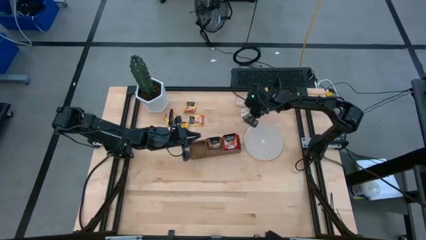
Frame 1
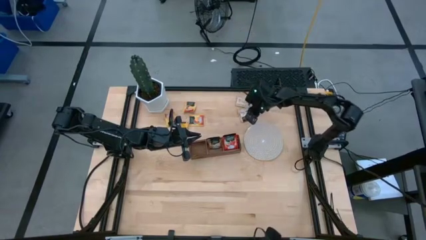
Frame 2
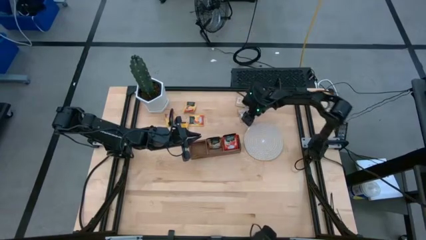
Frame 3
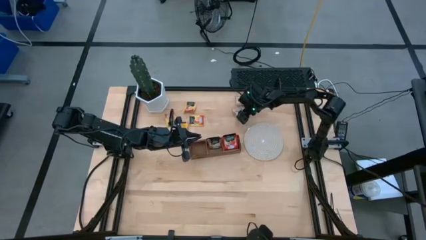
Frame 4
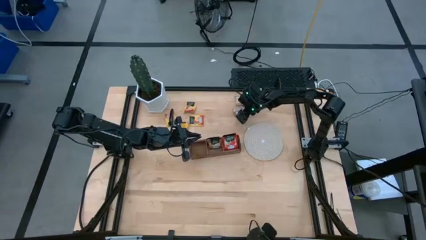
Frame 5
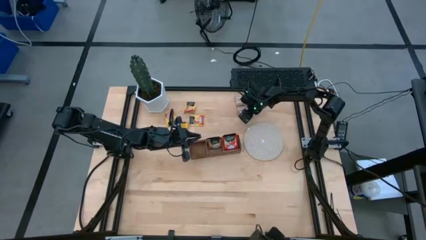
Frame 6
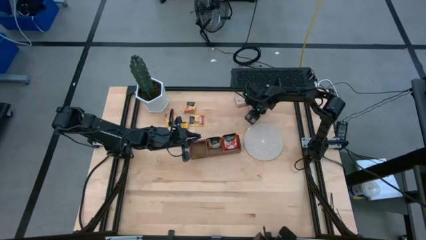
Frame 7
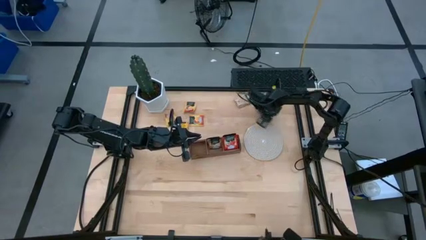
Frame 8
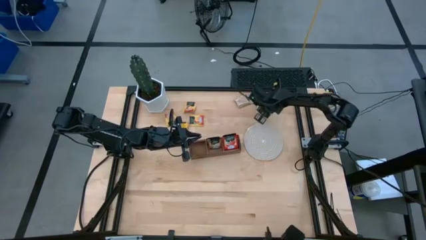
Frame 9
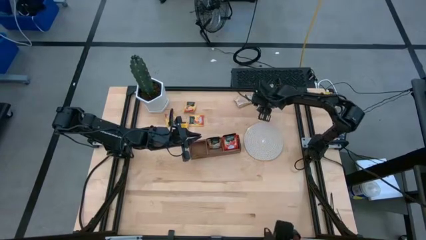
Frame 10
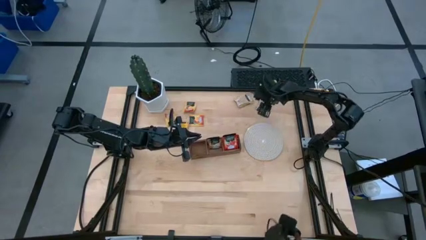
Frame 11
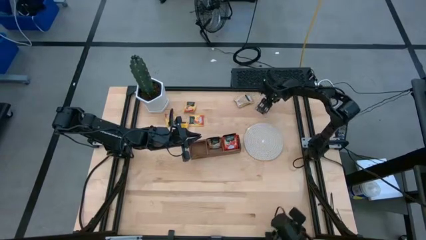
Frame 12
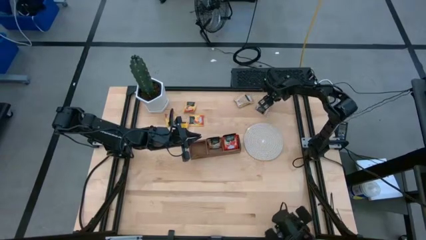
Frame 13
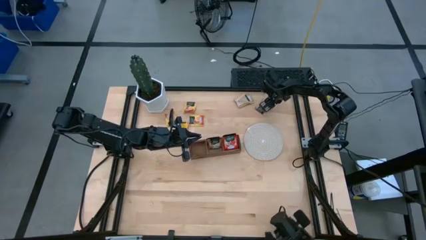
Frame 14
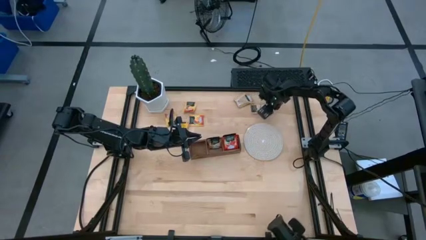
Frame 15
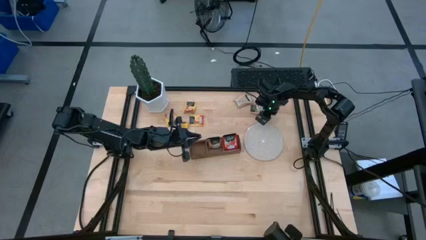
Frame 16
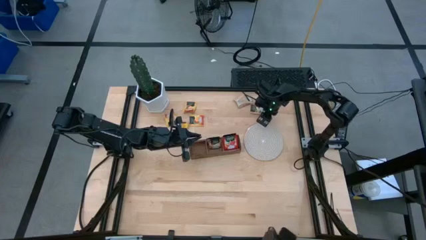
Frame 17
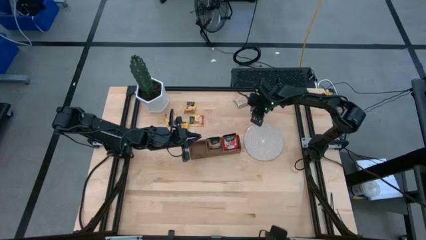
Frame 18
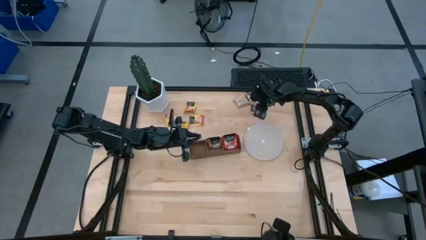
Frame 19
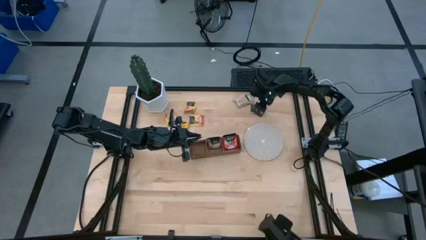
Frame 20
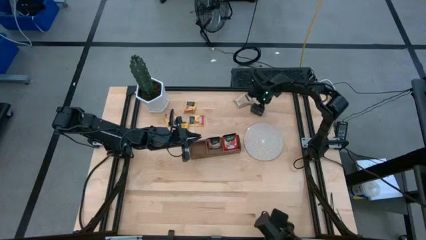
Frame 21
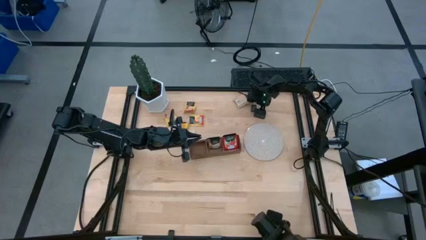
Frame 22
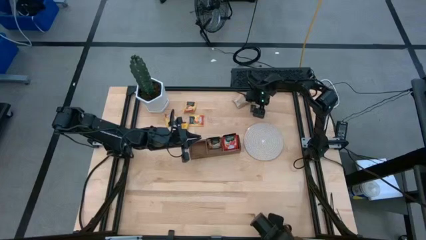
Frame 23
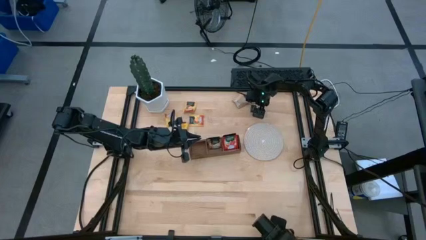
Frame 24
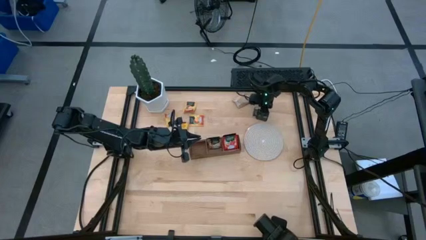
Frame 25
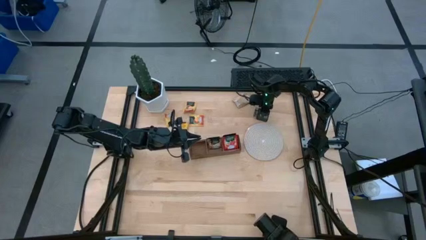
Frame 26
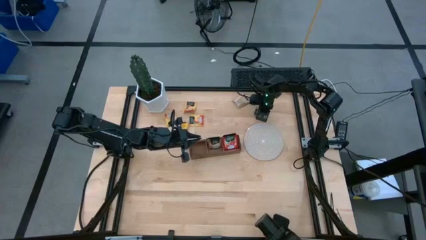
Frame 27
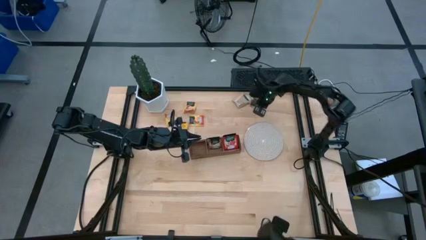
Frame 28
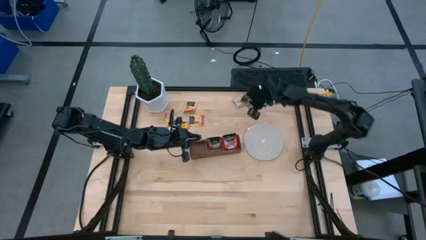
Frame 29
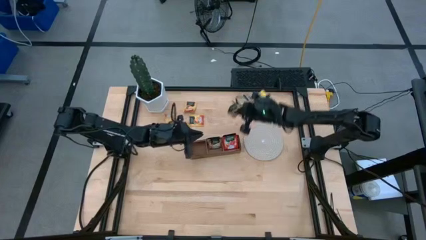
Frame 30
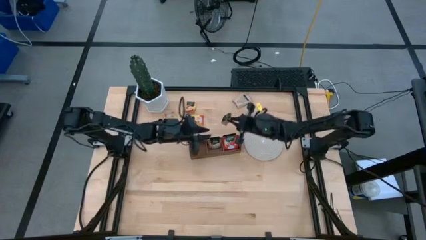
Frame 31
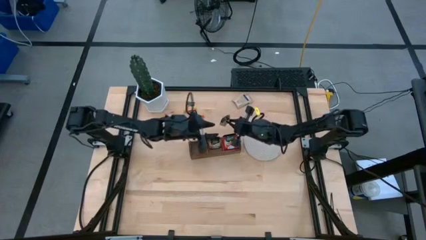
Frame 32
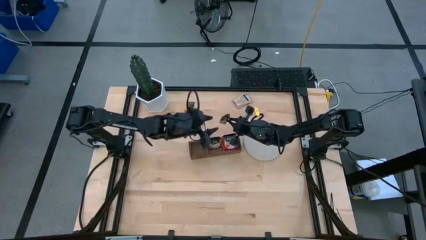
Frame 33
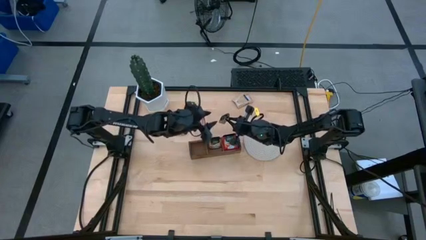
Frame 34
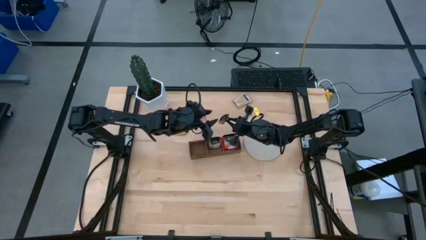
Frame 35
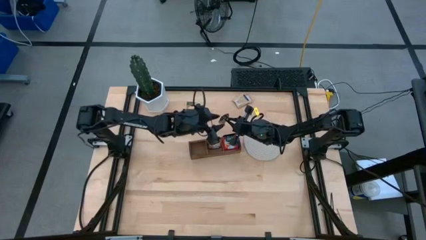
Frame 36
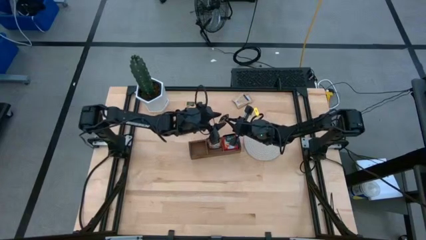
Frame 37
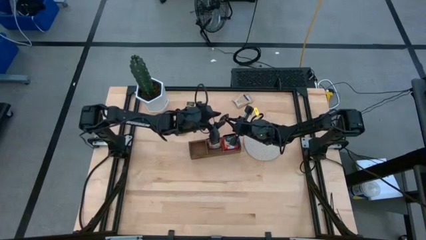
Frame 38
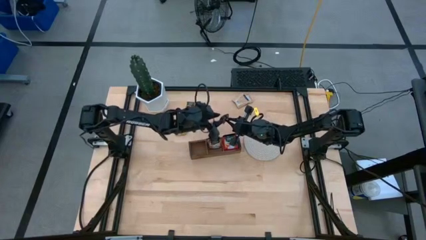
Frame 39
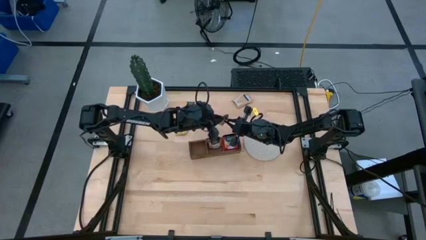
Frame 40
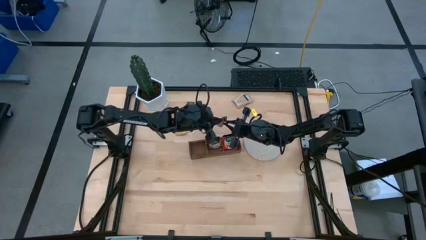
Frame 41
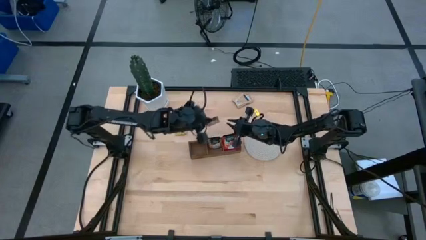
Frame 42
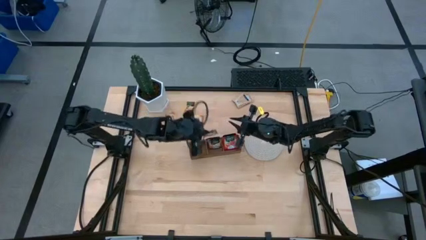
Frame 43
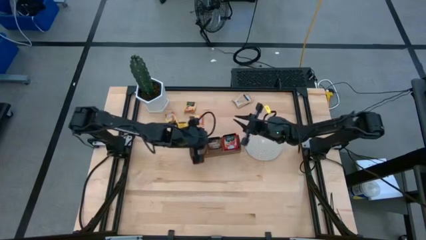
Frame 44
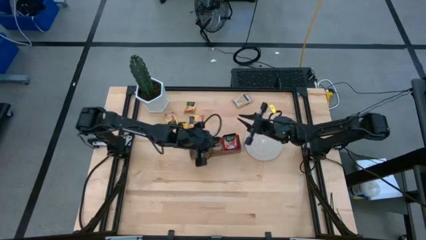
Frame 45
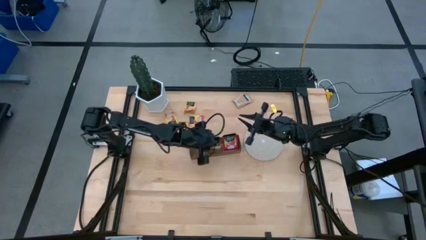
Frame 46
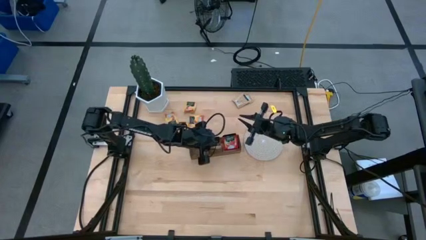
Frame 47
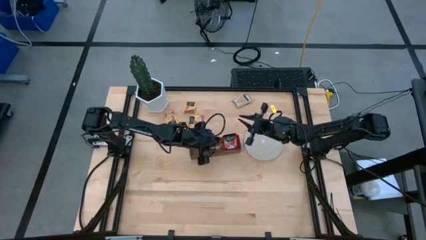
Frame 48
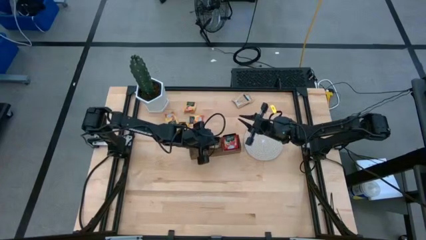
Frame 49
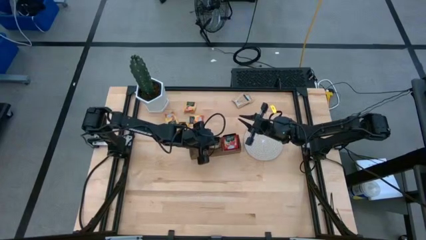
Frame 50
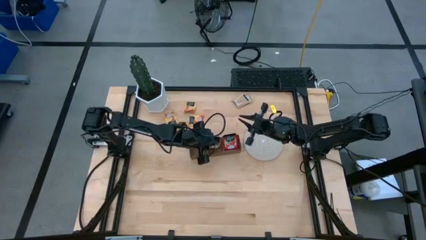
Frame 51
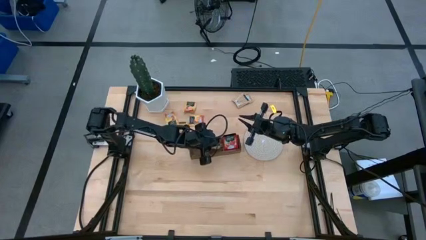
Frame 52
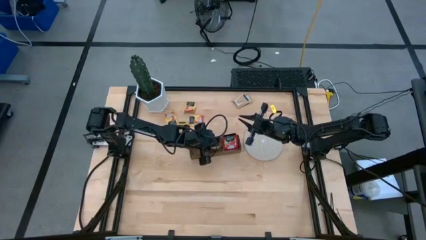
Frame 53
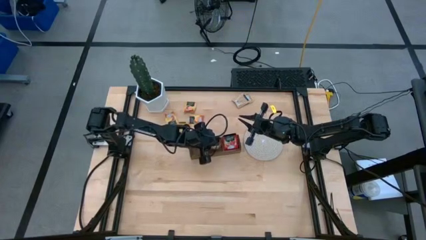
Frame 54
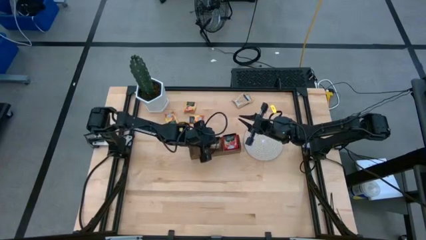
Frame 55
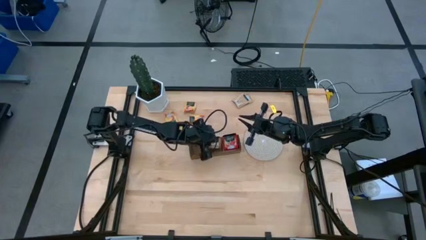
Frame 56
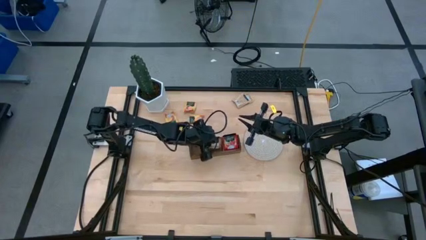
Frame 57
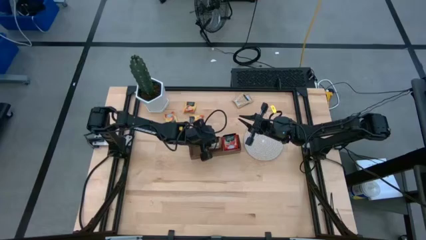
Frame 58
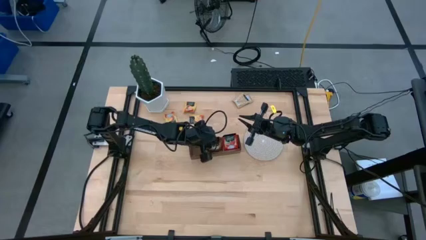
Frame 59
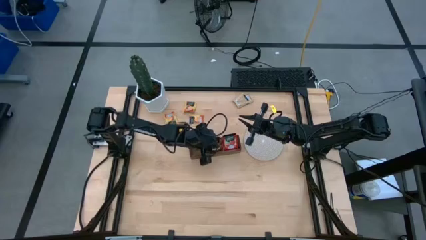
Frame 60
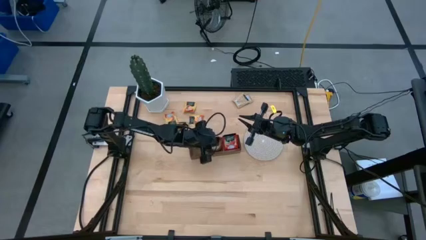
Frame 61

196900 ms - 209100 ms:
Task: Pick & Place Tea
Put the brown tea bag into the middle section of the wooden organizer

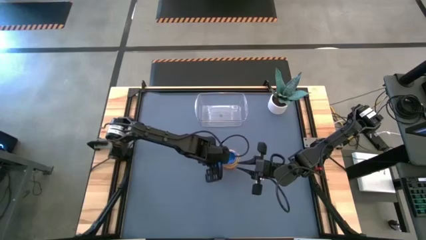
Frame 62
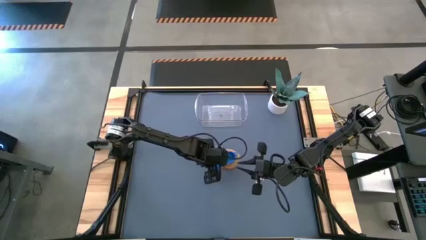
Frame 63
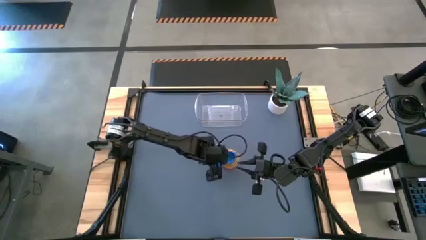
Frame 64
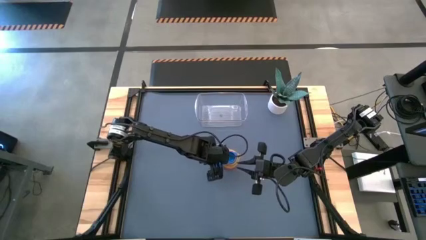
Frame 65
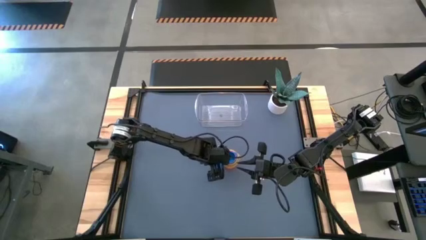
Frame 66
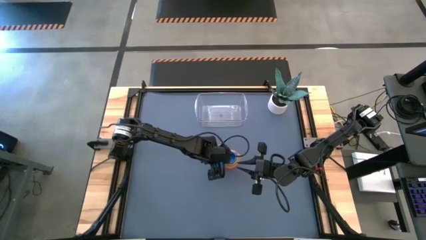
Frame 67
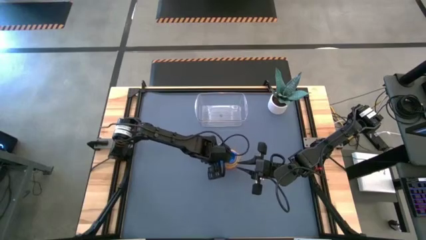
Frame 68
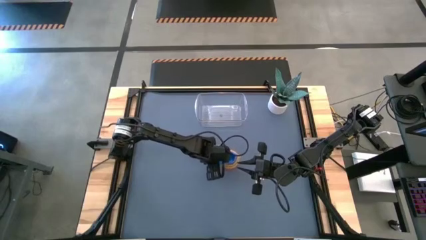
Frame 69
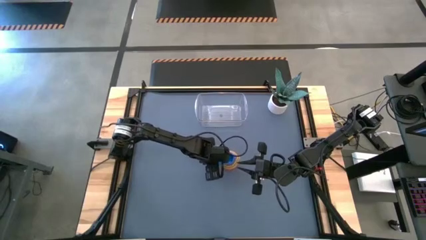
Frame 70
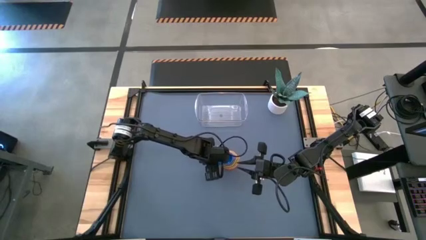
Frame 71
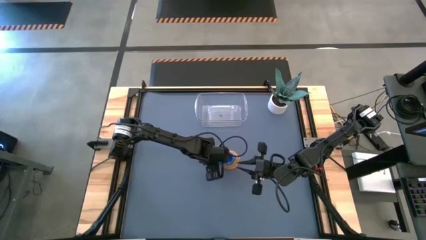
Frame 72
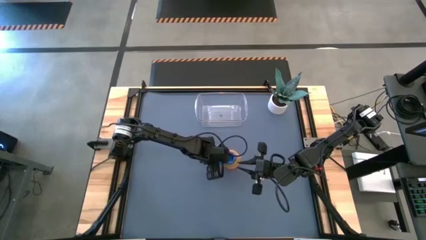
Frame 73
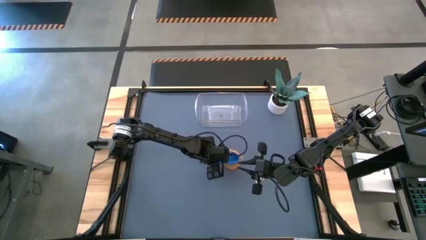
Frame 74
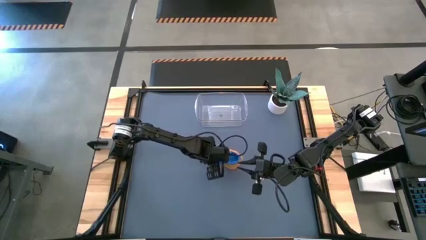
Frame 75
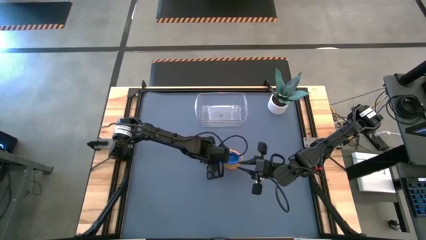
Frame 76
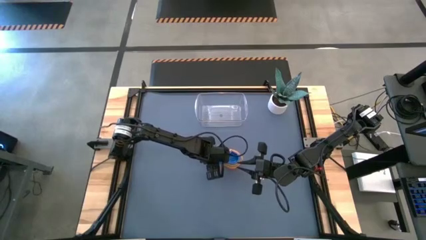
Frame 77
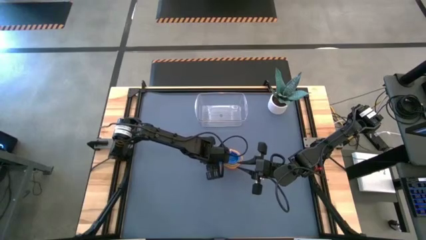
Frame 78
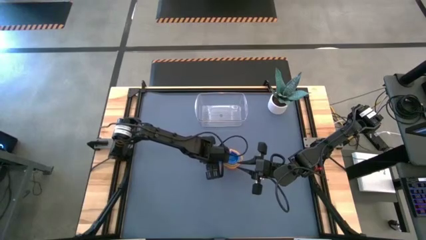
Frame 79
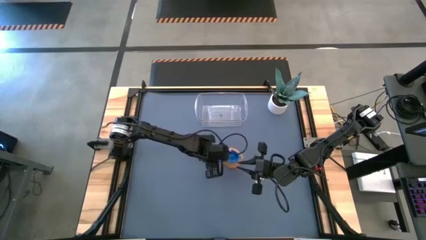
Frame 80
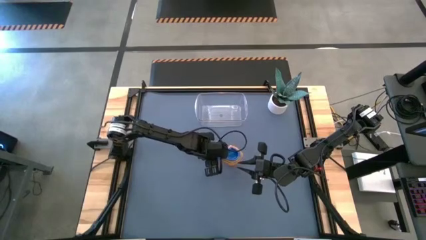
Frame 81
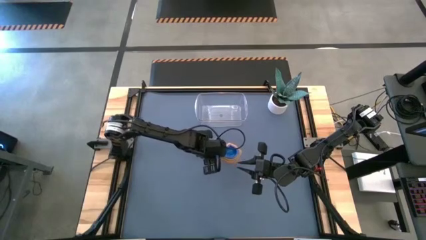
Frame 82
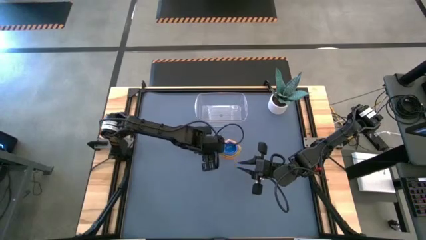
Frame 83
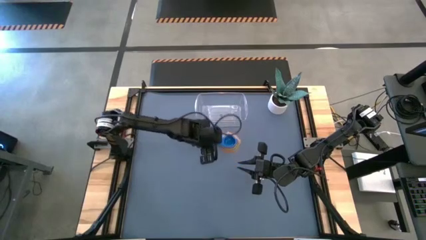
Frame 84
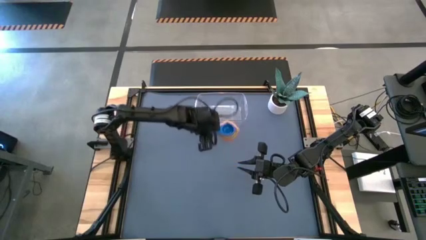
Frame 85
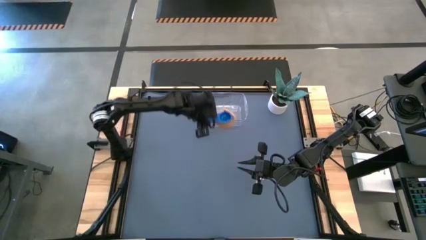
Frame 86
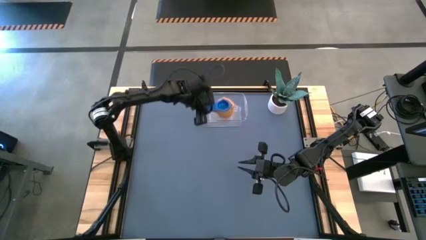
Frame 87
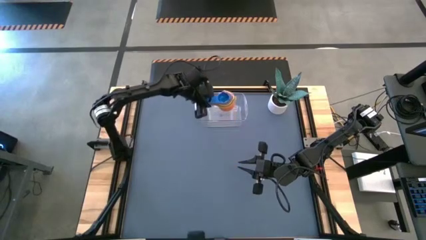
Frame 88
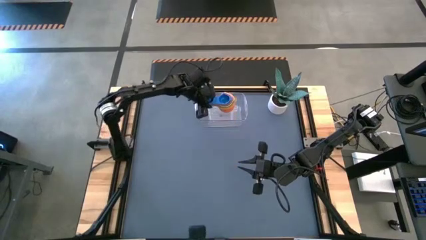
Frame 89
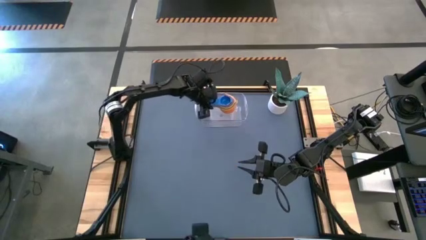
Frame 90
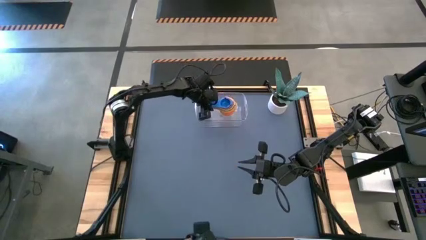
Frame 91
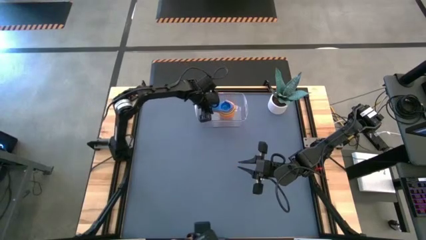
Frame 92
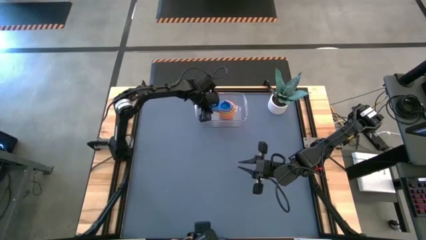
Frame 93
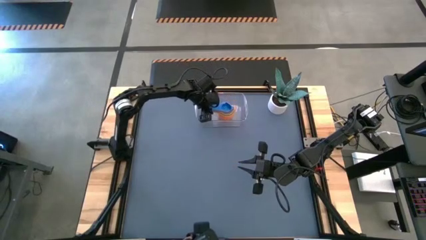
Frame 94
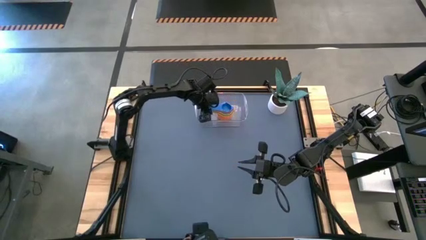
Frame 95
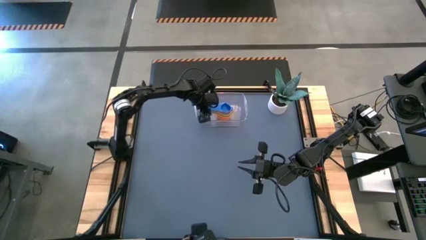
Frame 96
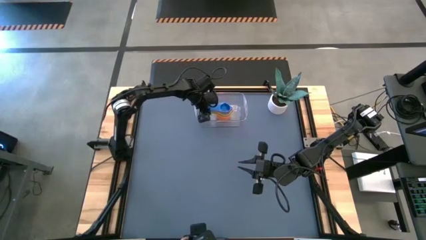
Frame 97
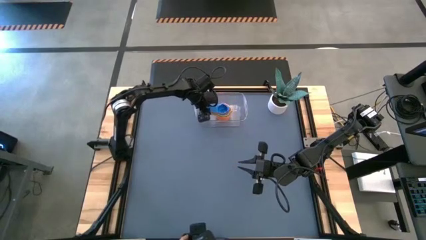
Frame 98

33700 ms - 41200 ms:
Task: Nest measuring cups in basket
Put the nested colored measuring cups into the transparent bin
